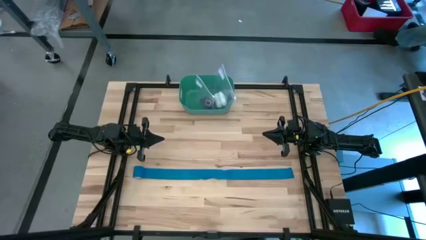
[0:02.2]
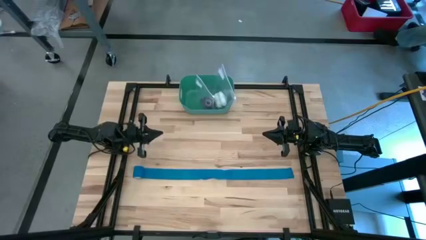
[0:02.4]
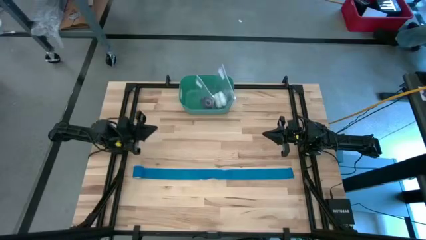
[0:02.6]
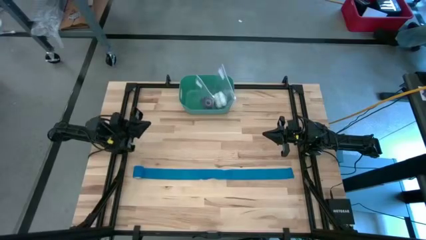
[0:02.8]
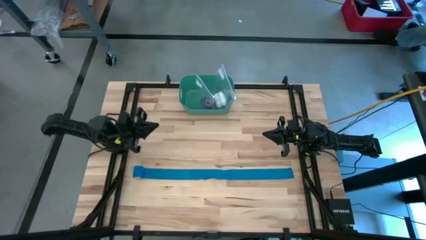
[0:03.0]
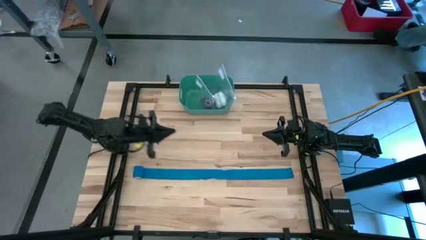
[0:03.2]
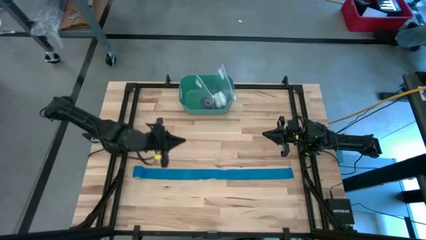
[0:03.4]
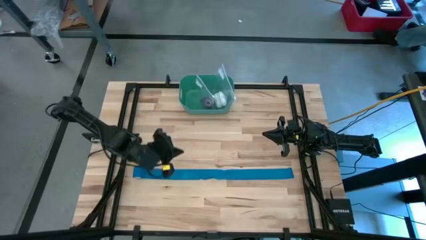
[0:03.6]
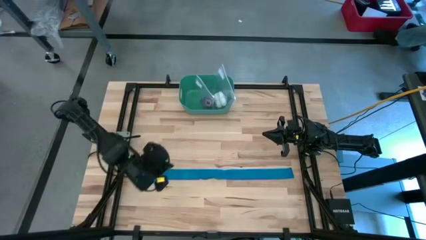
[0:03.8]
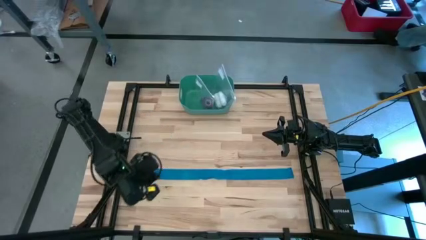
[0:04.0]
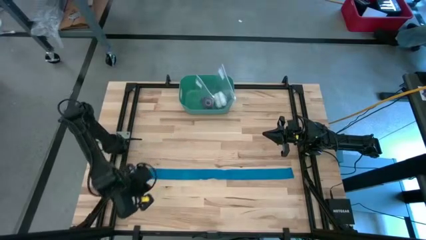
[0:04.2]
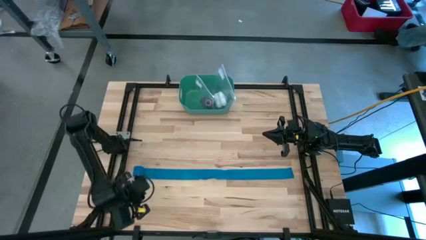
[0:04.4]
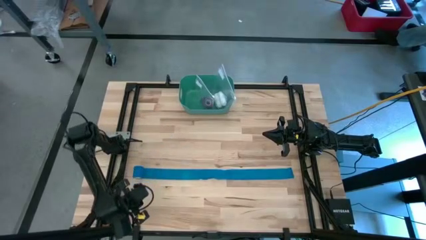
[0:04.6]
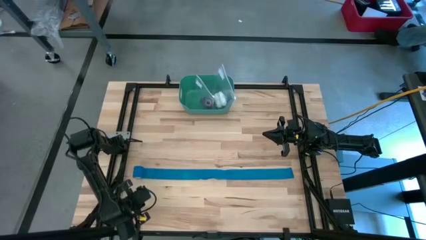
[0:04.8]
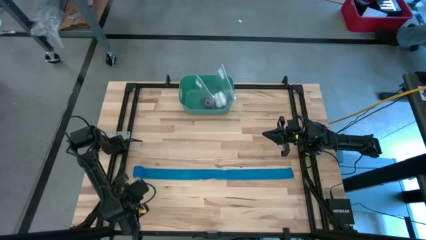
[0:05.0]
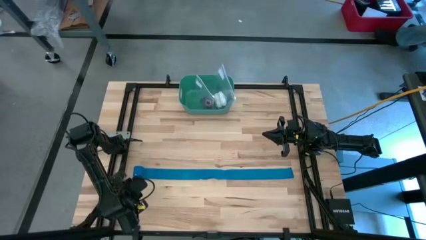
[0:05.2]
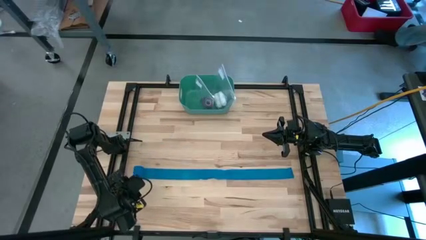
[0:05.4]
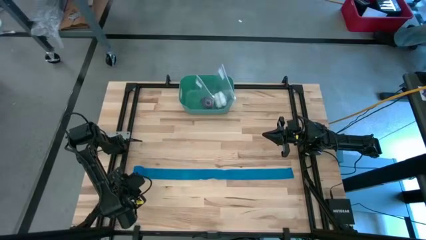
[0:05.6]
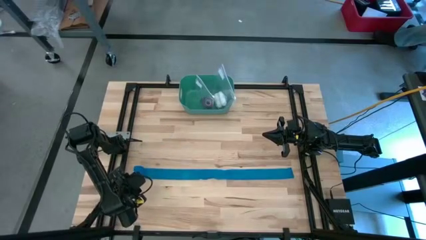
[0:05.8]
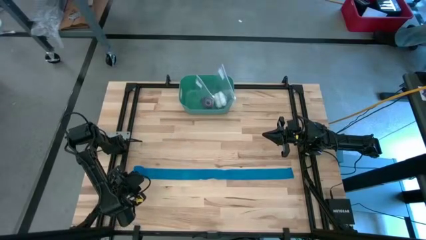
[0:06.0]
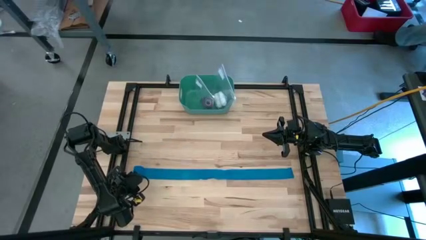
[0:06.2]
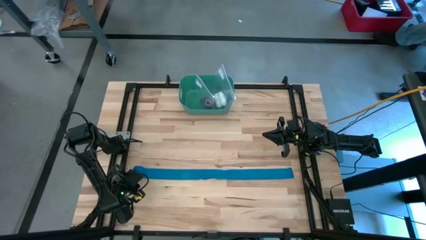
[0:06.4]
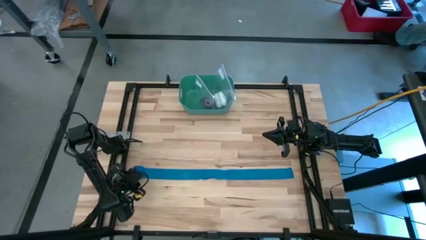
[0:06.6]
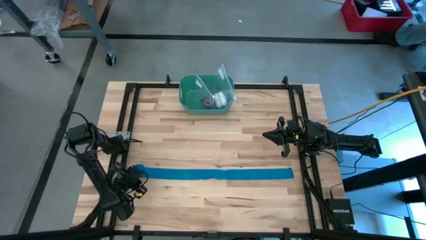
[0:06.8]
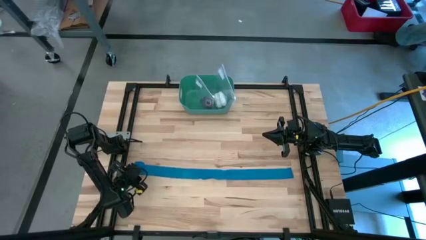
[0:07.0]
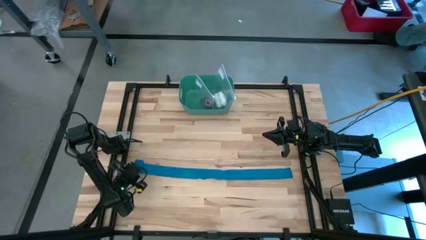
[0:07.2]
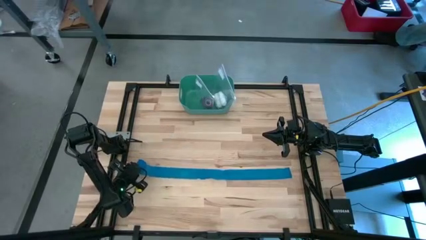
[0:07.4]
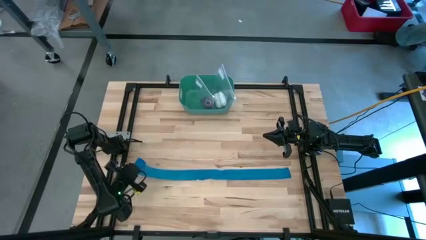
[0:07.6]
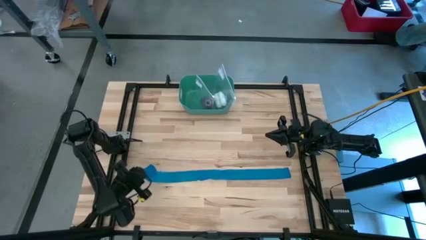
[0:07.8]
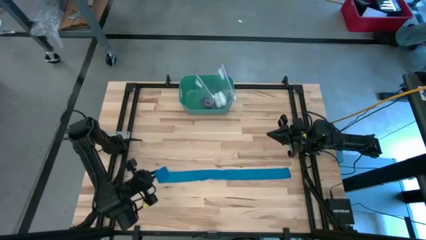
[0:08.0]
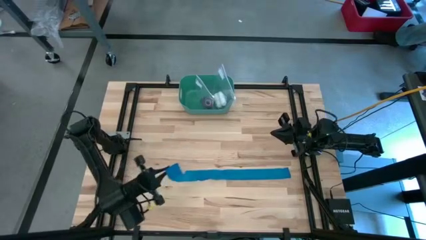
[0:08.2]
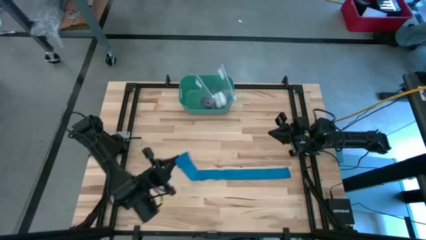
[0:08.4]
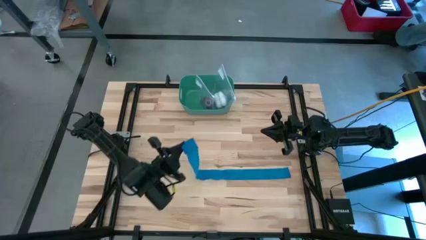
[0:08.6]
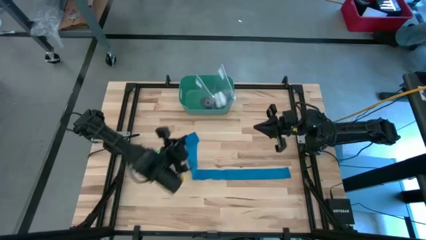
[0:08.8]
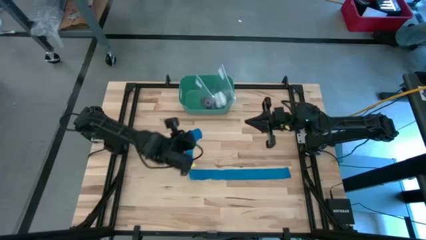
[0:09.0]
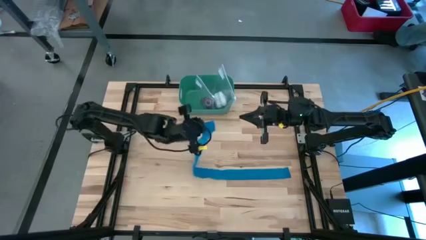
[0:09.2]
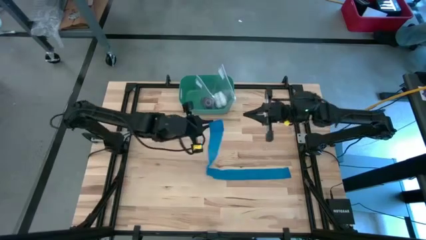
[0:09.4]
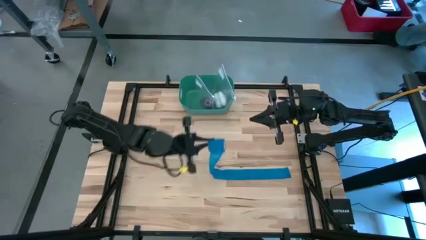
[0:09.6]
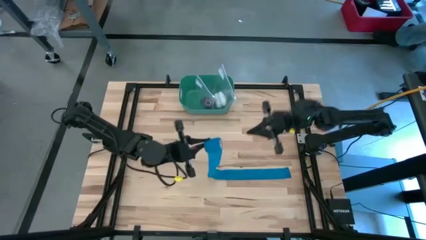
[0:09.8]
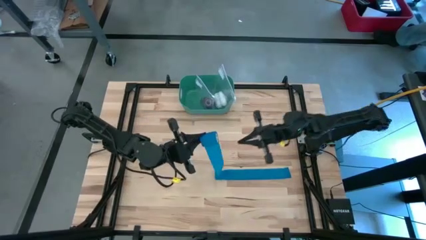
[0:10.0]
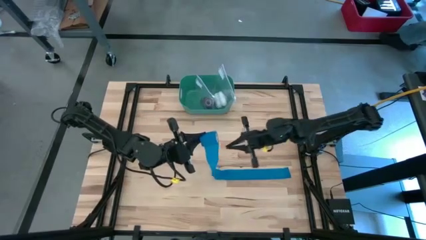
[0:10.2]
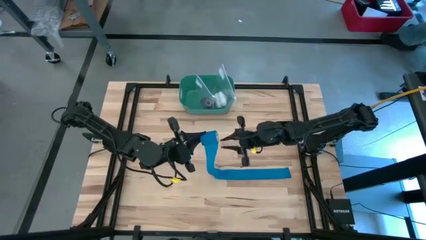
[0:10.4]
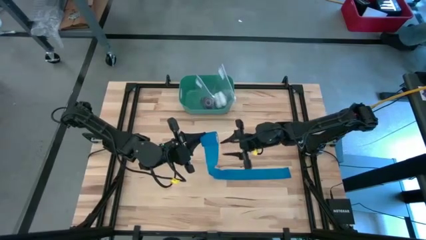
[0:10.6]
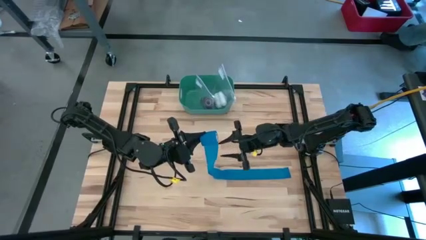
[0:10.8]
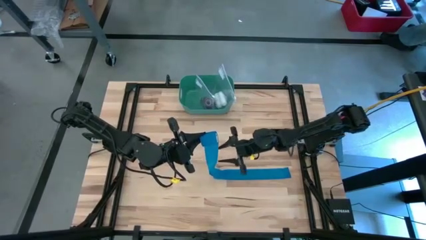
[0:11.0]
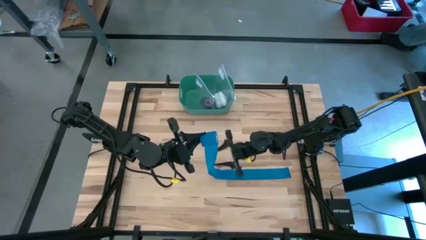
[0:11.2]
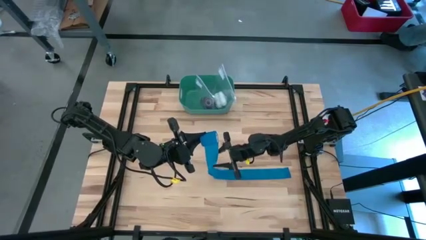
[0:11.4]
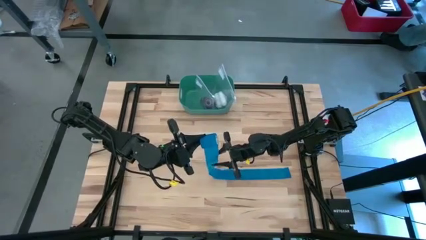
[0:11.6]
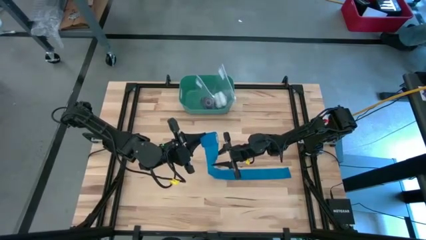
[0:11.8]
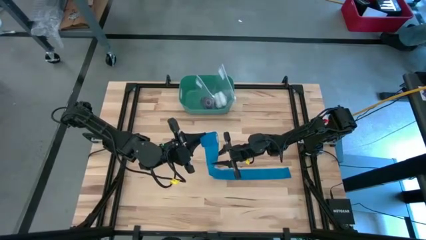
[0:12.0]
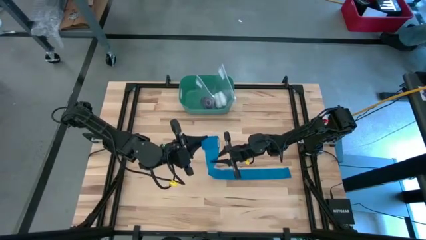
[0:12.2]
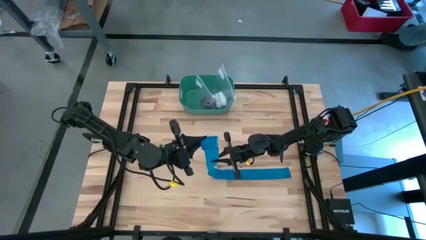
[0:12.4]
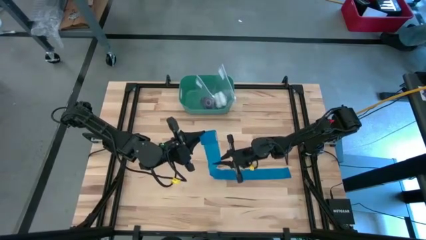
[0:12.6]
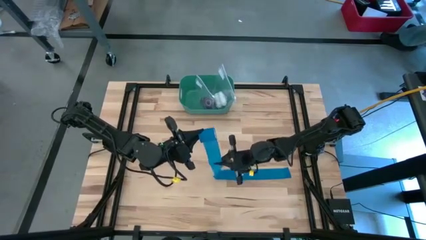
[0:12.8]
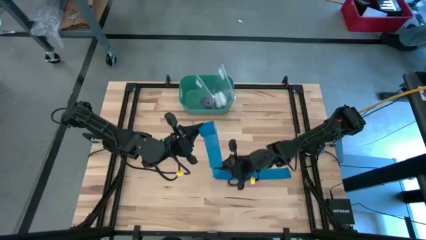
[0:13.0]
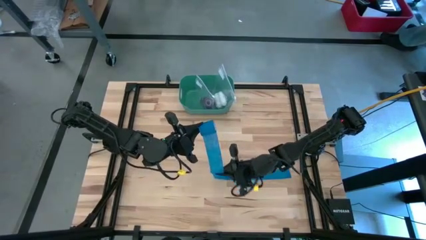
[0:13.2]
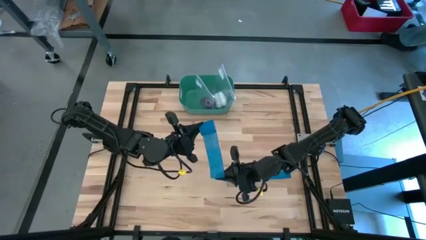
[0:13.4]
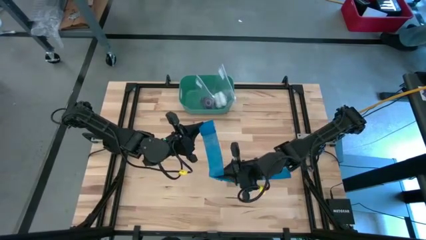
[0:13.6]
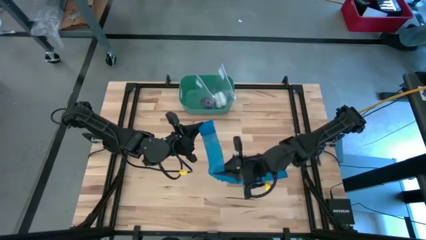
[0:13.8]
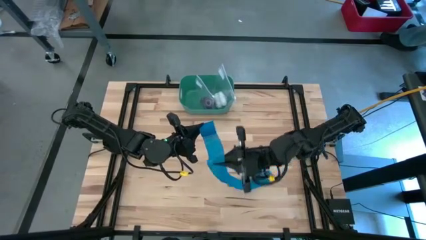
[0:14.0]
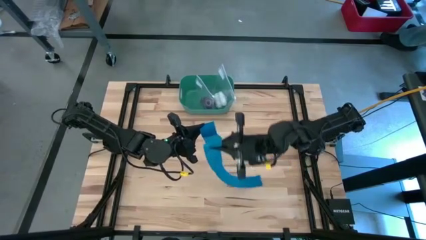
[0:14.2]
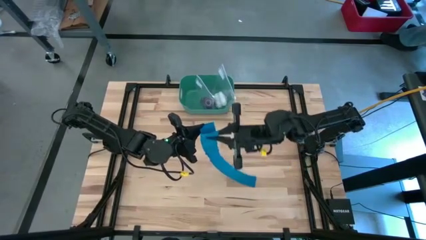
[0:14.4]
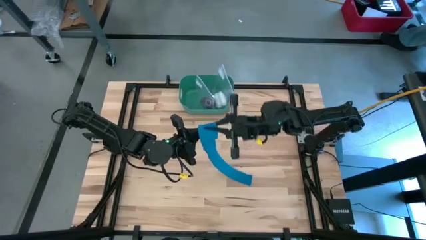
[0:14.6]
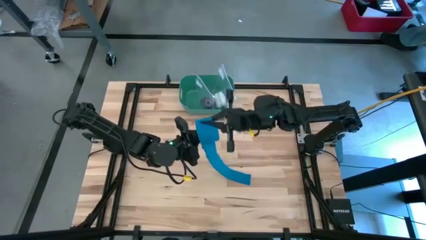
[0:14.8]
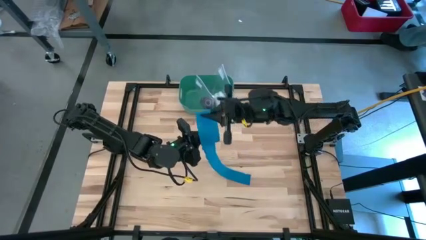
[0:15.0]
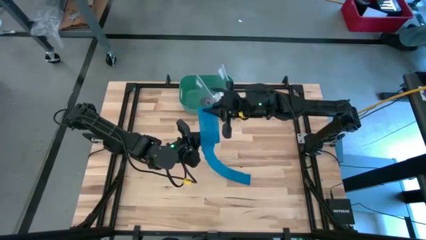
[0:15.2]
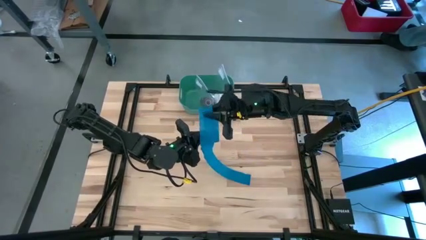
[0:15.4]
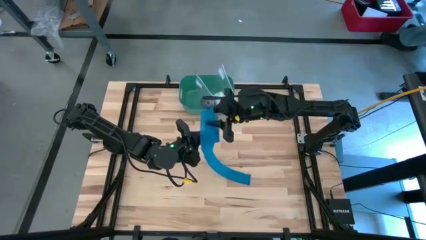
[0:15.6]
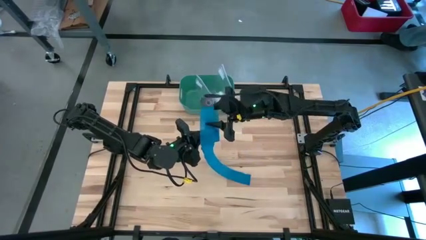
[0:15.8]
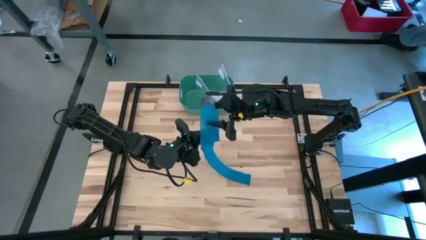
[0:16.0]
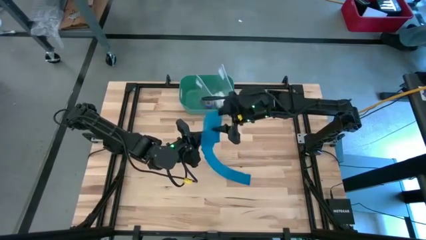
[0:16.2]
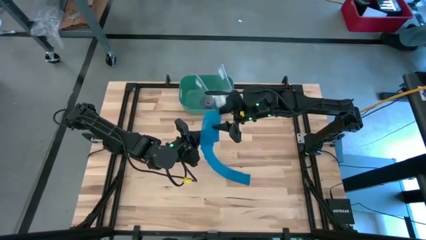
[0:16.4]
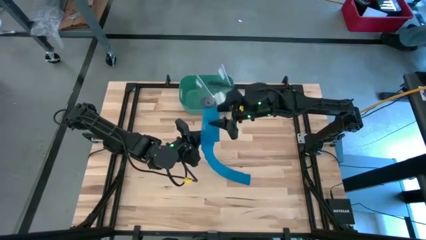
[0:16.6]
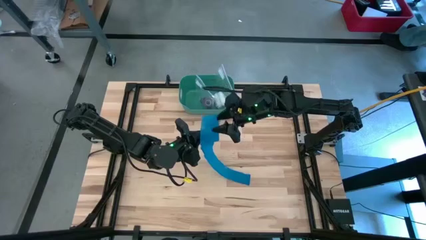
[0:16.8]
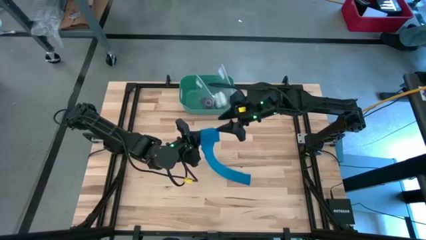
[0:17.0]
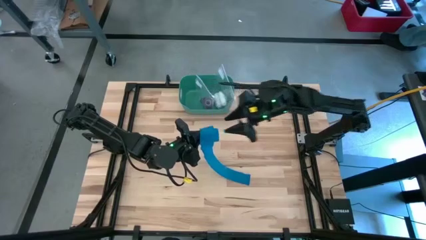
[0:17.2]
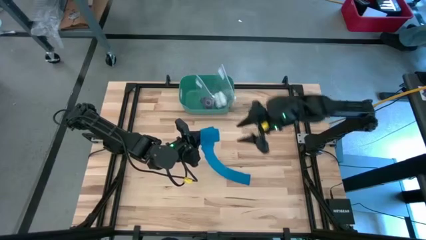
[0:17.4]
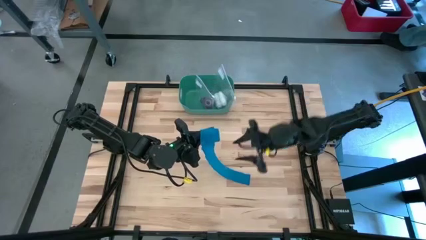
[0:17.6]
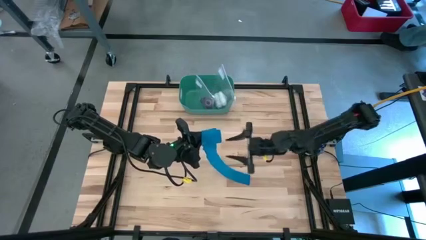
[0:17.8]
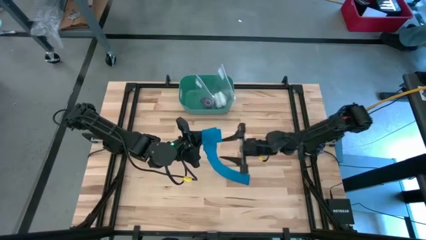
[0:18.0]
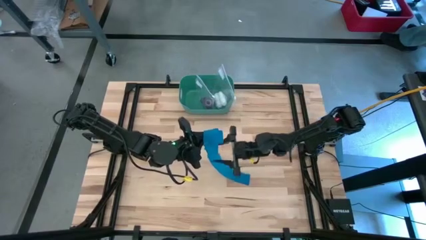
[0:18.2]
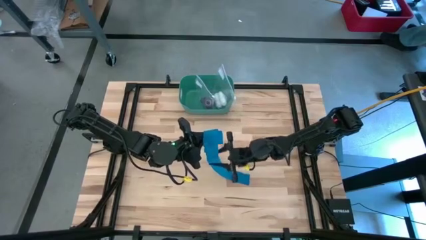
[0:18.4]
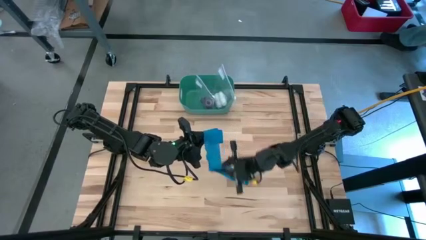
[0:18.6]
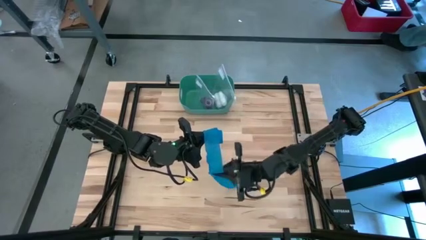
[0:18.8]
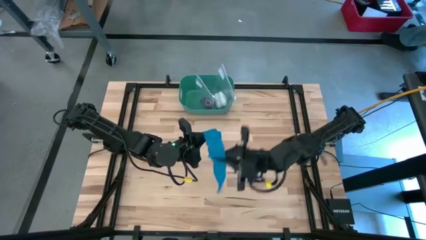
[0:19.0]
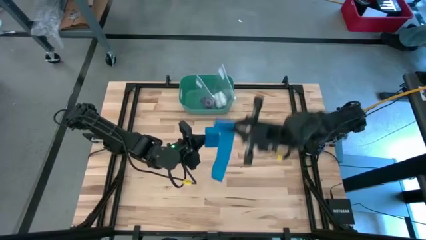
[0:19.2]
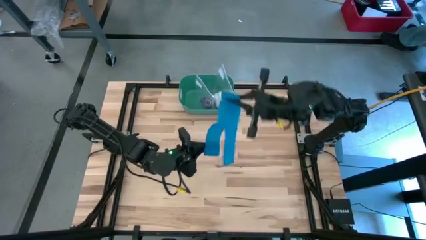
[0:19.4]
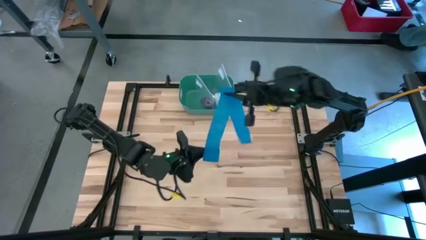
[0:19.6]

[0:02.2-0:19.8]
Task: Roll bandage
Roll the blue bandage
